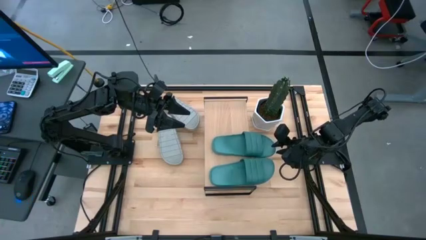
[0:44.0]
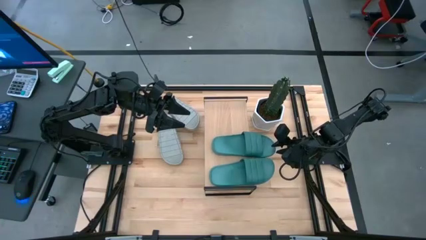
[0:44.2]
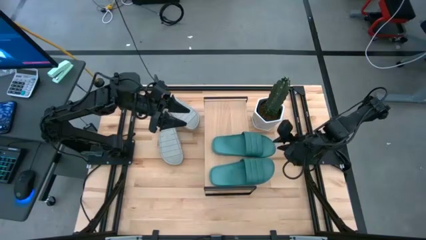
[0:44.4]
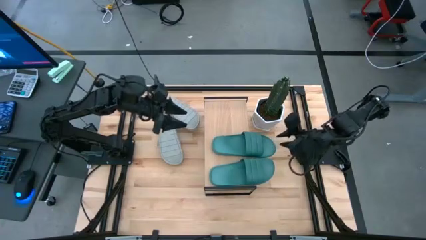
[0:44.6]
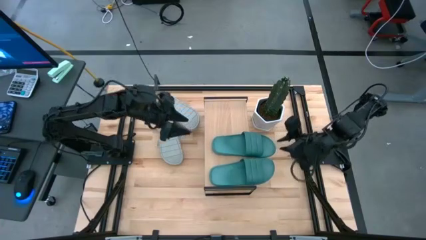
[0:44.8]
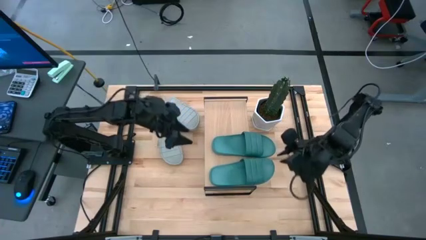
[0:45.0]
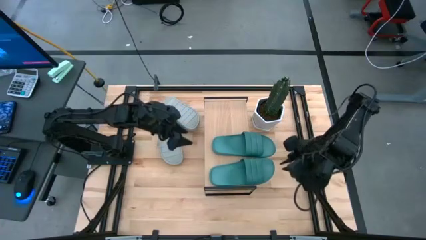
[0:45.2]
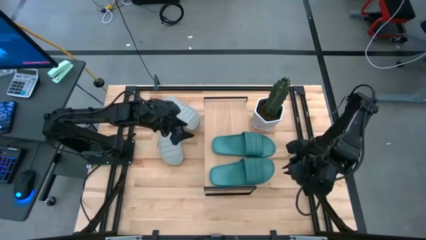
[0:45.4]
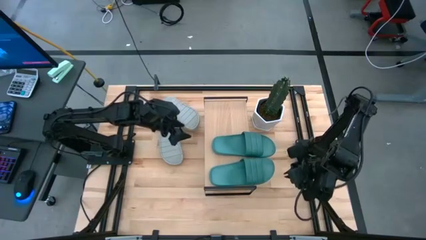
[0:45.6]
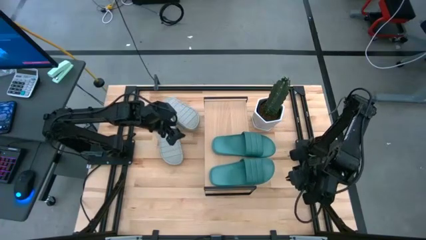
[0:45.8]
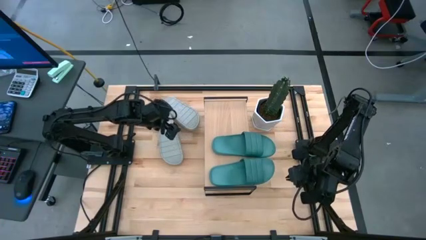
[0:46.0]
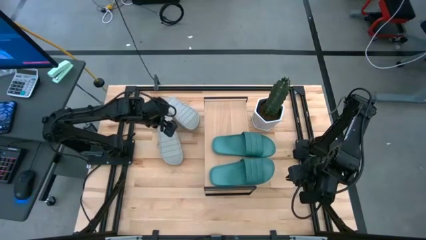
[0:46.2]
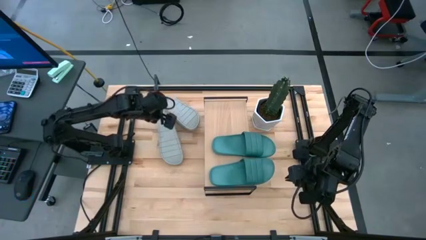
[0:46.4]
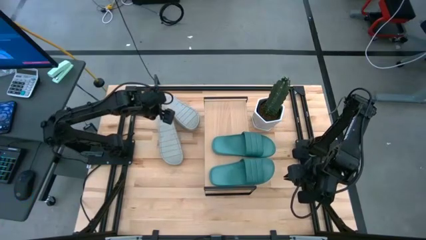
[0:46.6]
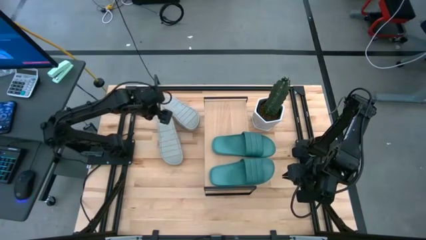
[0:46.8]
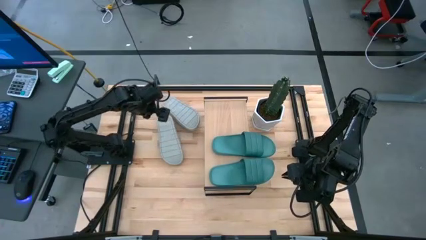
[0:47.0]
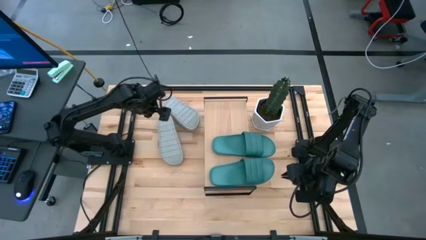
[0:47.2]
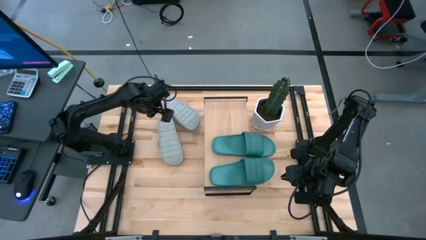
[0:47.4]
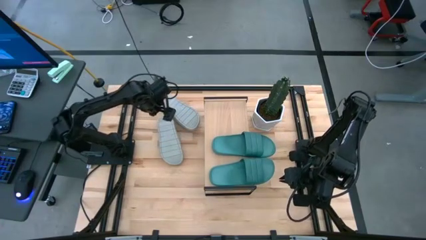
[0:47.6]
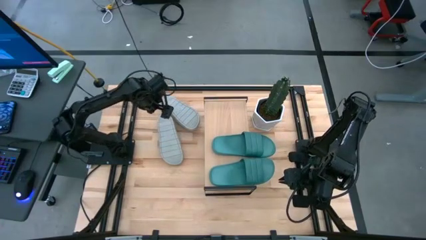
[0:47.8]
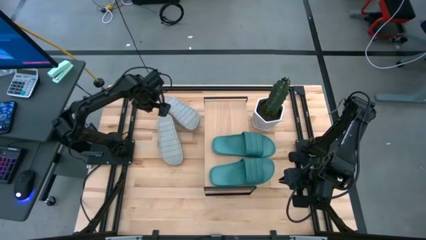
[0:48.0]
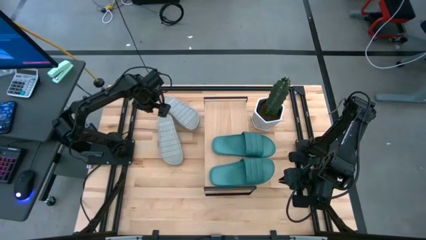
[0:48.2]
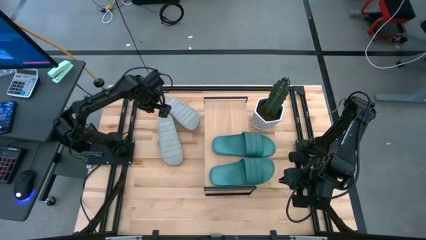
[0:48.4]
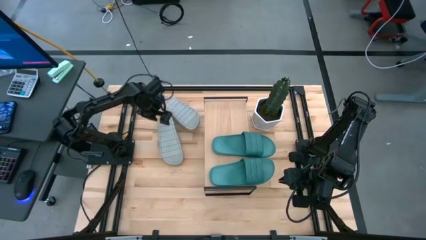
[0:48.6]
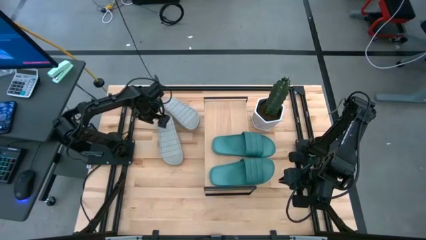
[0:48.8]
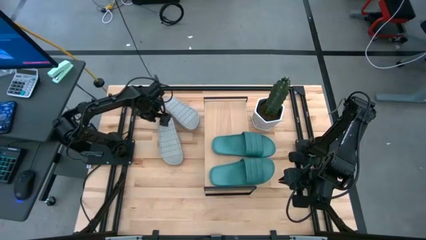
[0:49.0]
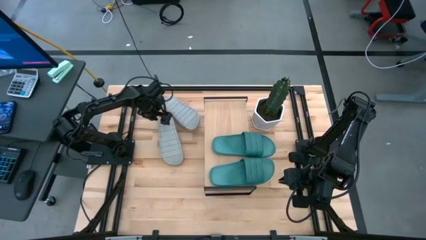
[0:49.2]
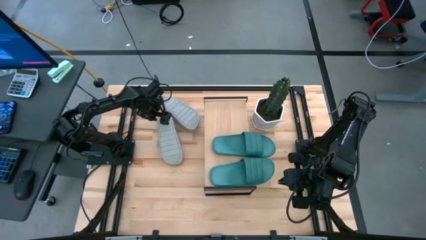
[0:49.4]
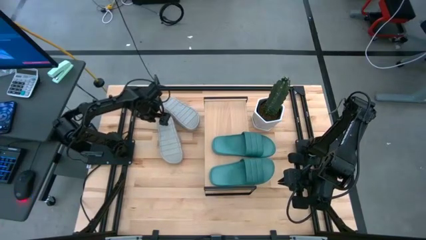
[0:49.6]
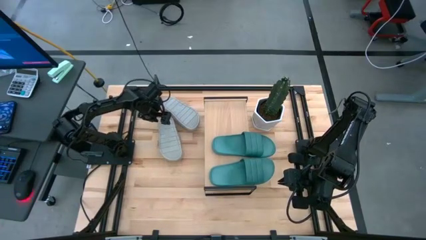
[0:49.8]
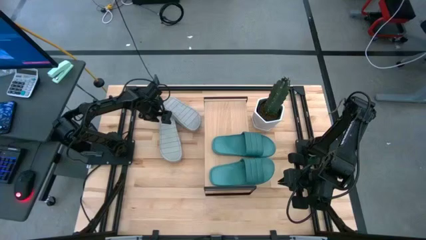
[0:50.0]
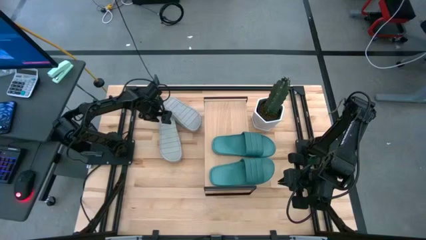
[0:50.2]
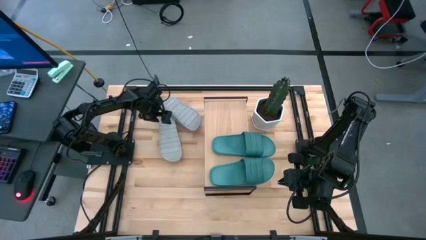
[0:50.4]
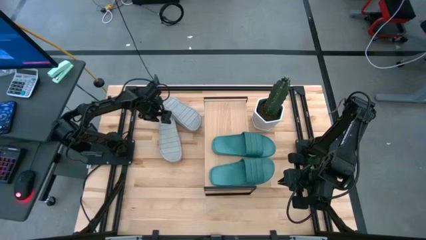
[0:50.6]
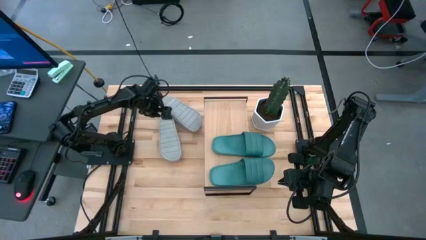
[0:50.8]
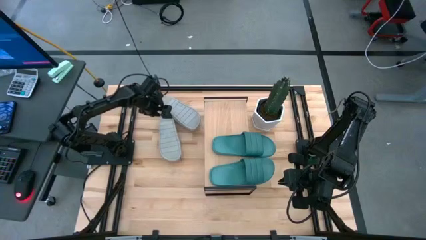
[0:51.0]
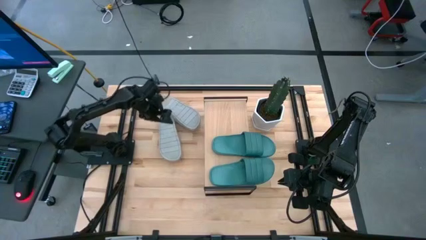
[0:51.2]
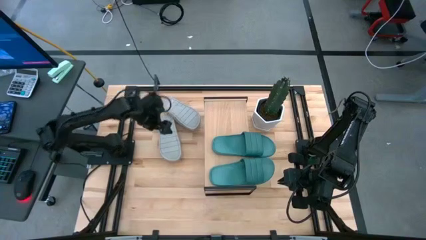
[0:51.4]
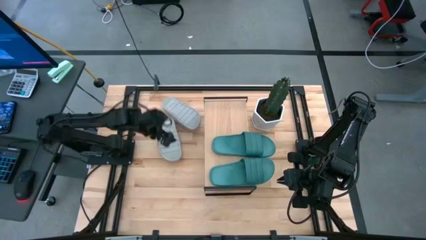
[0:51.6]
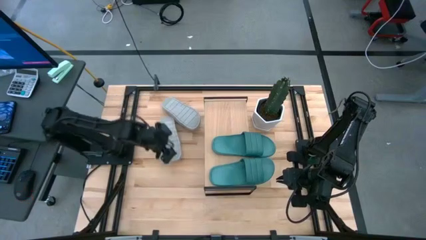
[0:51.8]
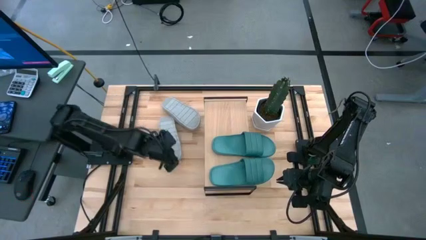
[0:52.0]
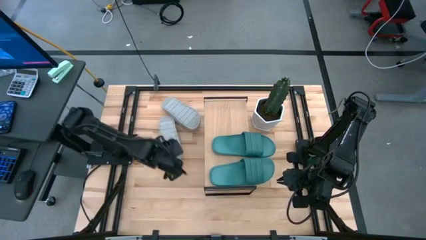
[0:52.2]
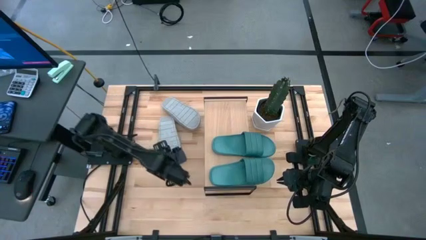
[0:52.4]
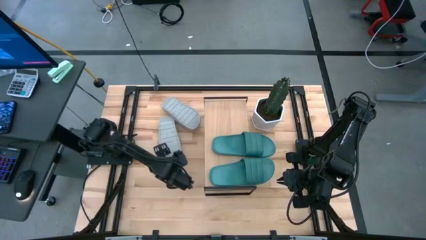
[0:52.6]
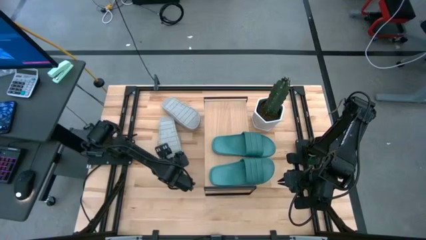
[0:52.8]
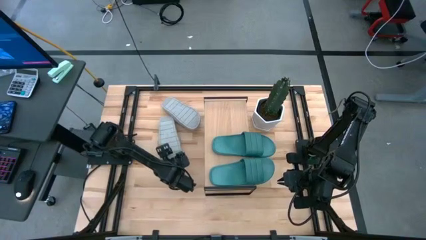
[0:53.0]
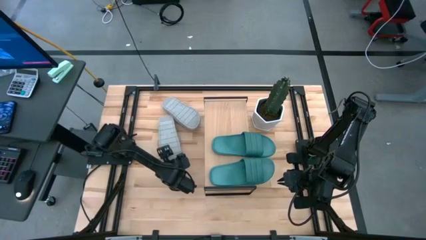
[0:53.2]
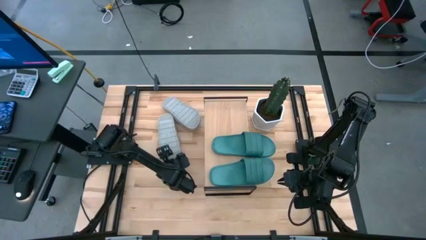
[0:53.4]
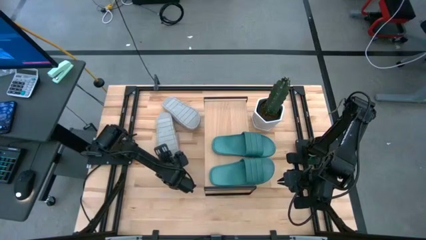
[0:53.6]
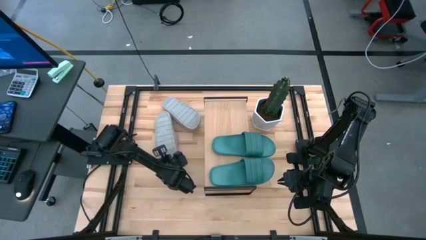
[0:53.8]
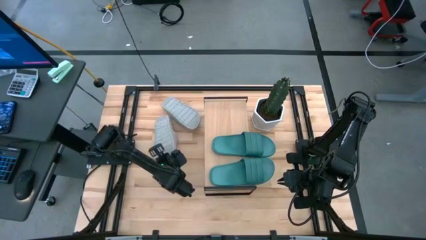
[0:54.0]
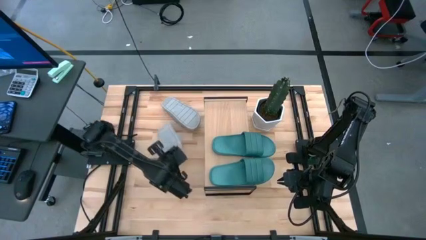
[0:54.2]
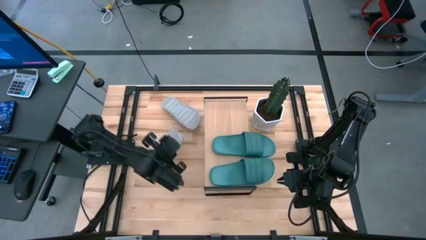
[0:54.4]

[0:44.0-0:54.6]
Task: Pick and place slides into the shelf
Put the bottom gray slide on the shelf
